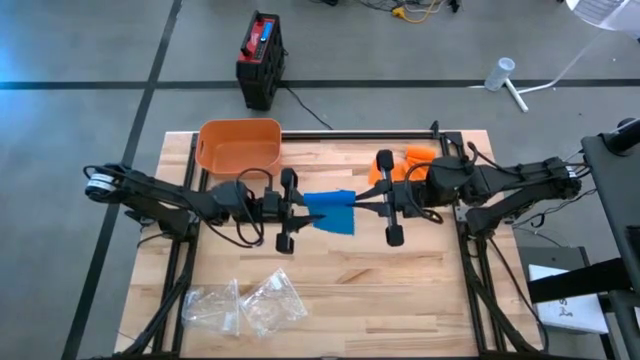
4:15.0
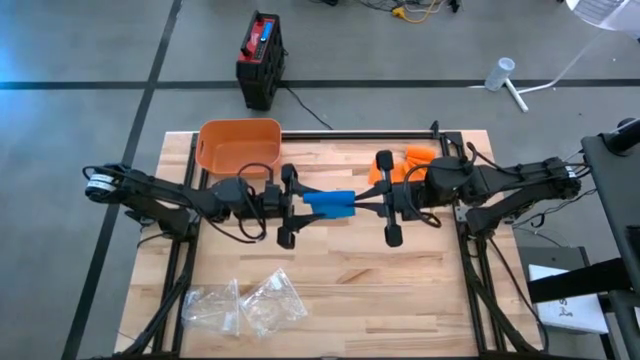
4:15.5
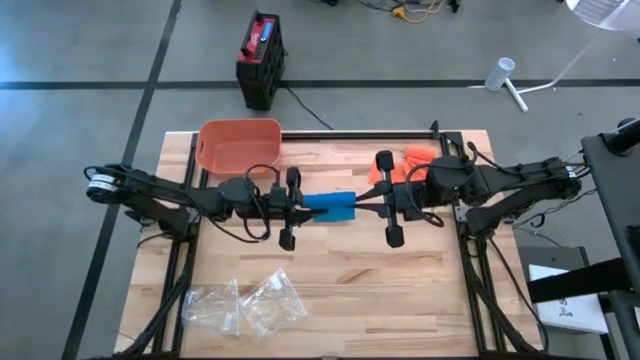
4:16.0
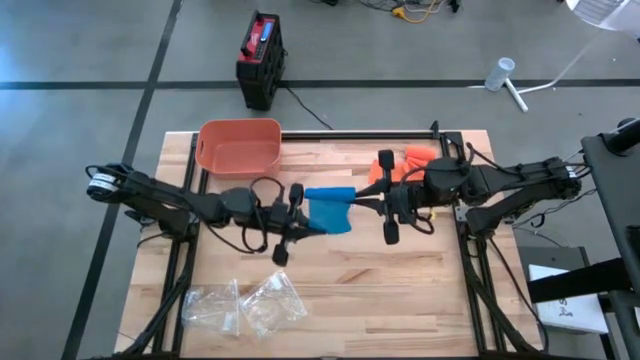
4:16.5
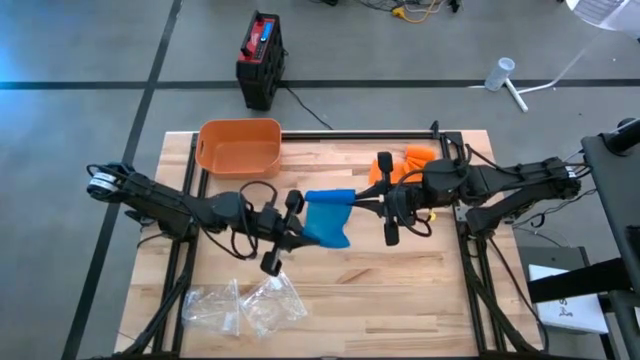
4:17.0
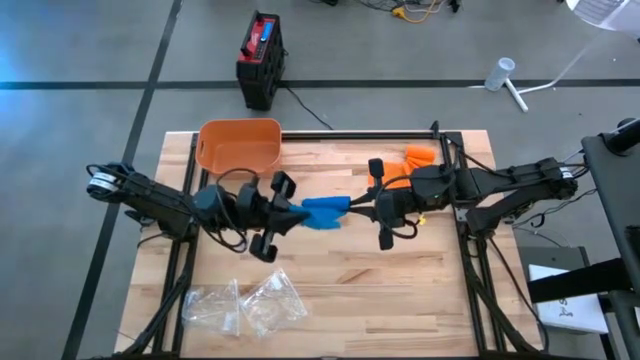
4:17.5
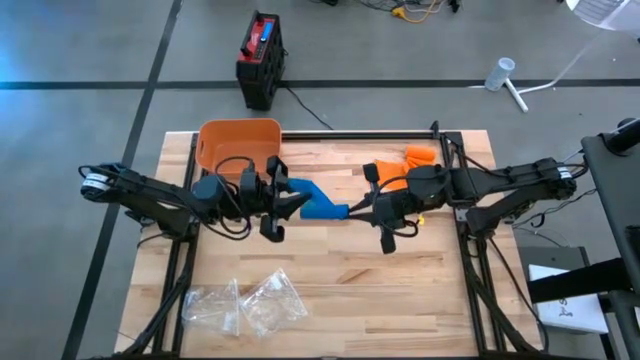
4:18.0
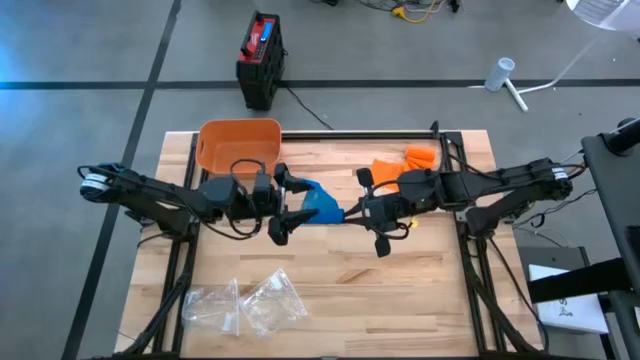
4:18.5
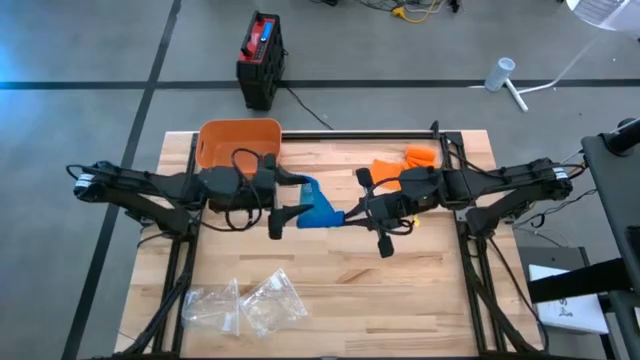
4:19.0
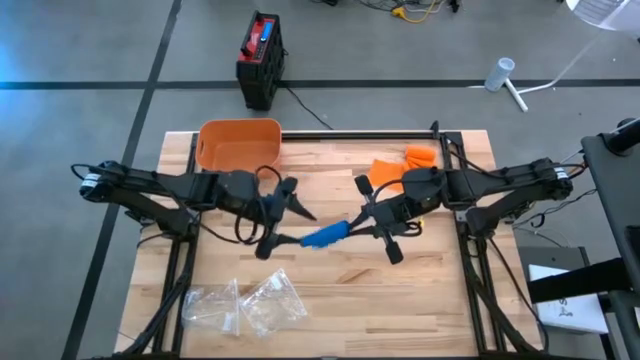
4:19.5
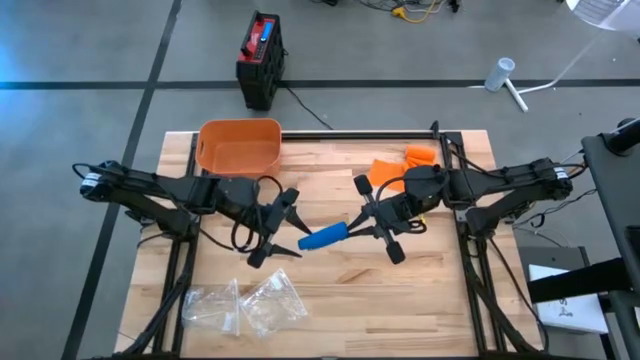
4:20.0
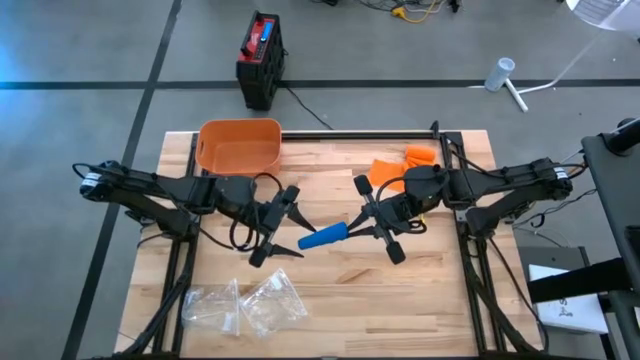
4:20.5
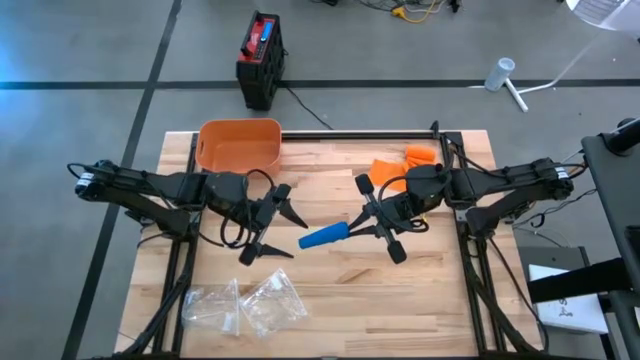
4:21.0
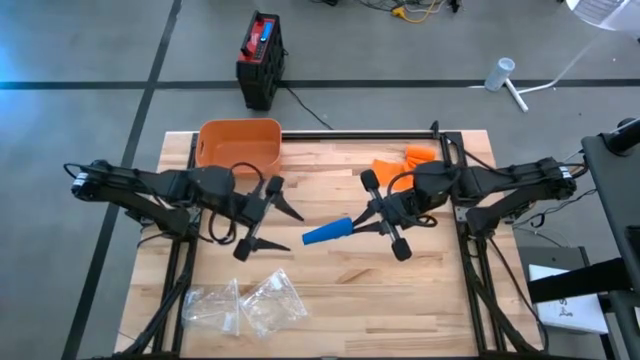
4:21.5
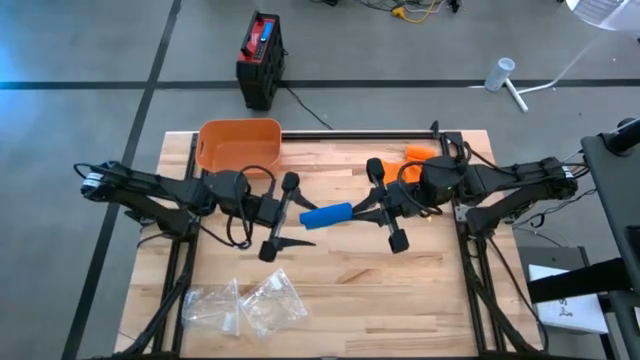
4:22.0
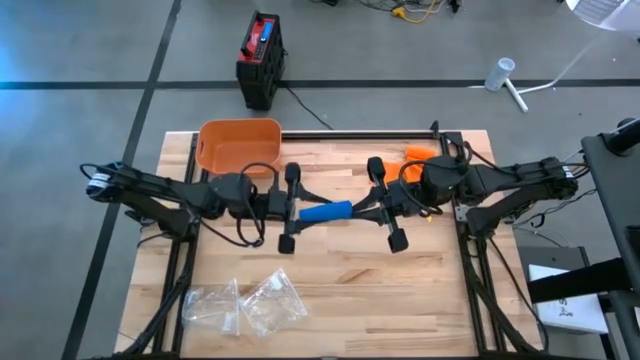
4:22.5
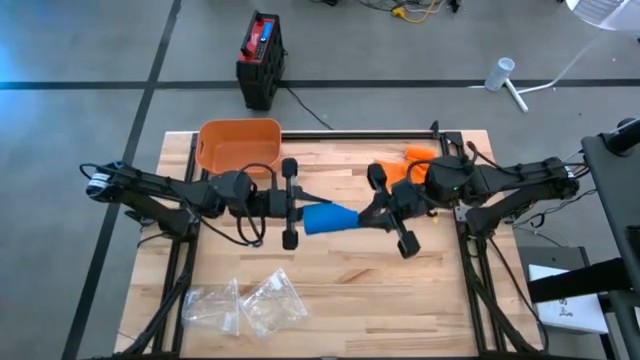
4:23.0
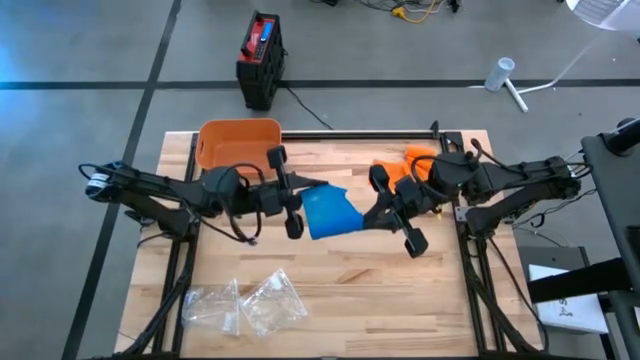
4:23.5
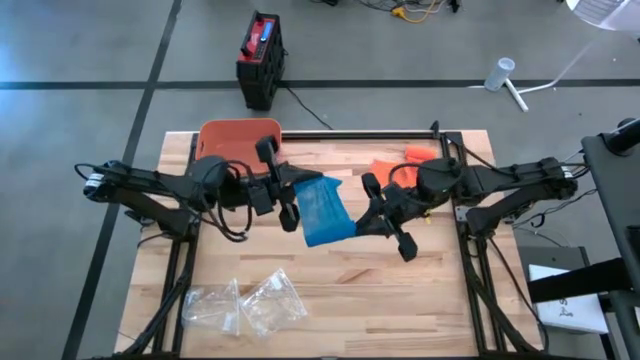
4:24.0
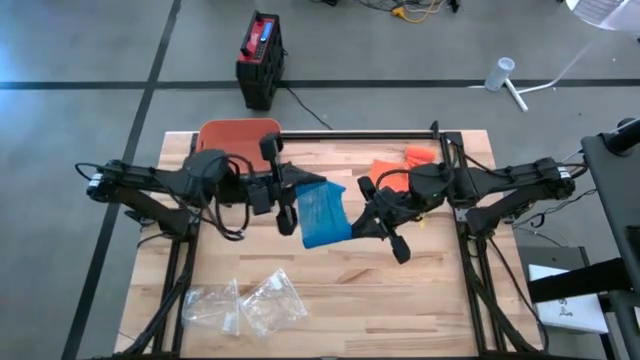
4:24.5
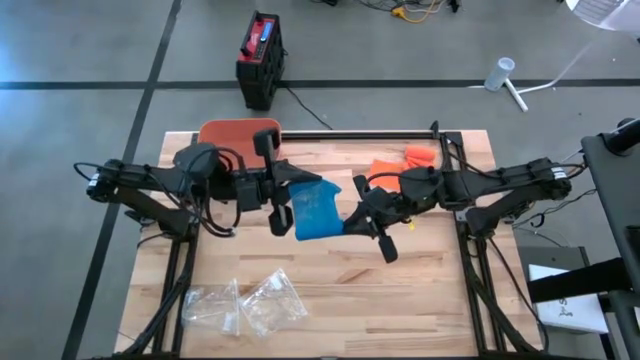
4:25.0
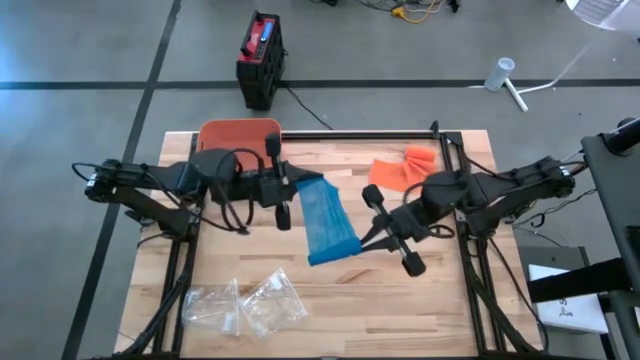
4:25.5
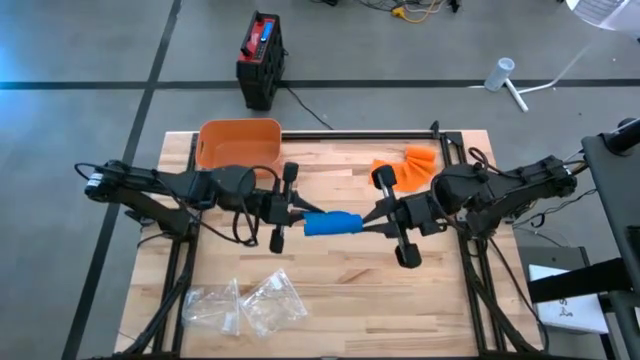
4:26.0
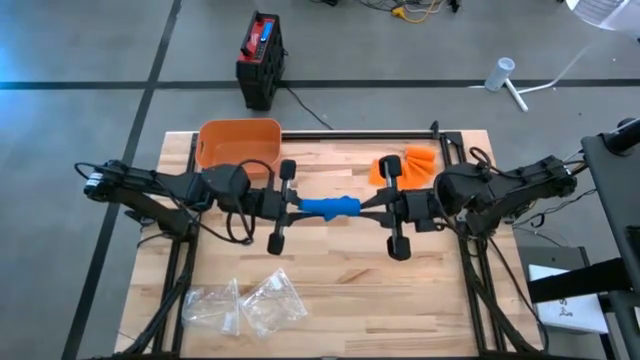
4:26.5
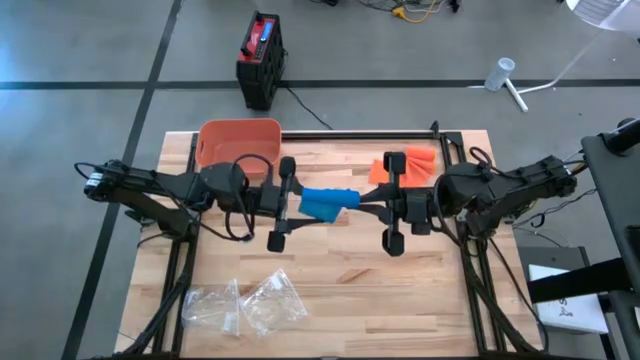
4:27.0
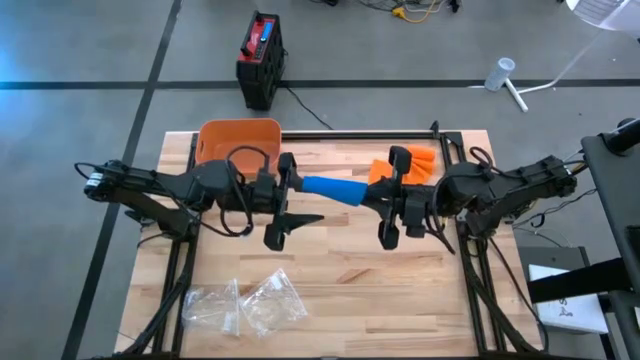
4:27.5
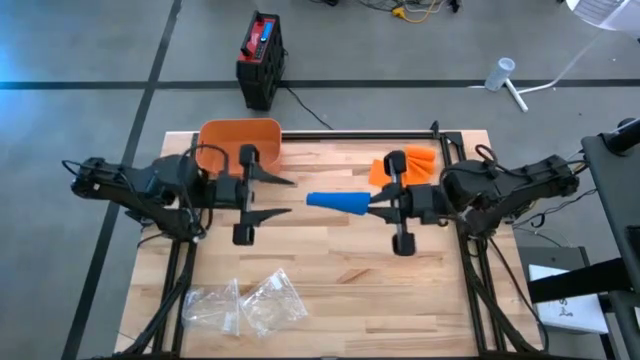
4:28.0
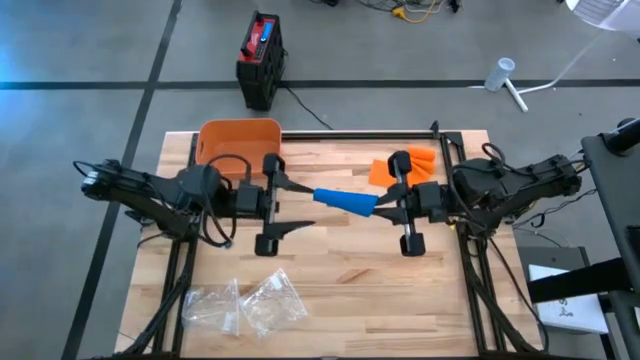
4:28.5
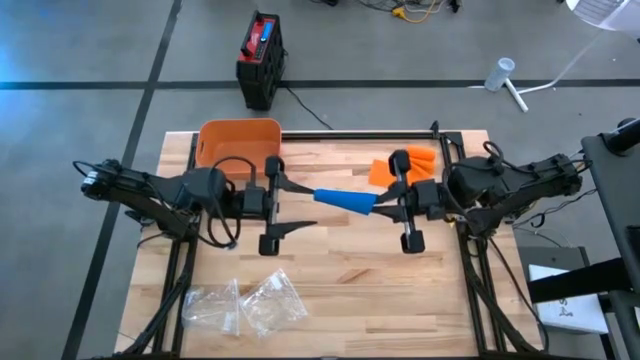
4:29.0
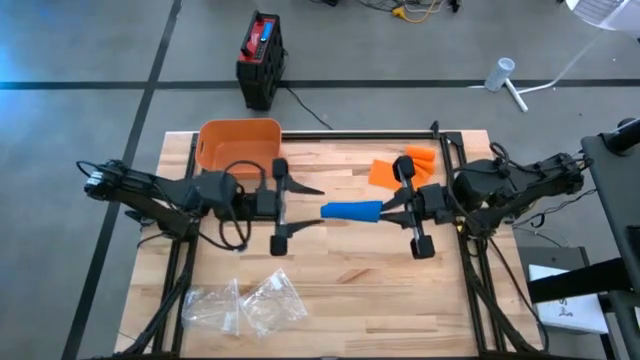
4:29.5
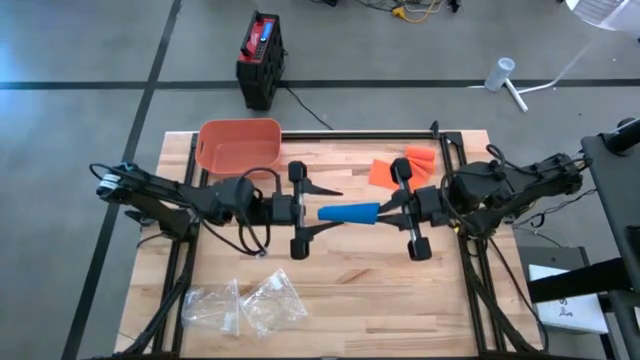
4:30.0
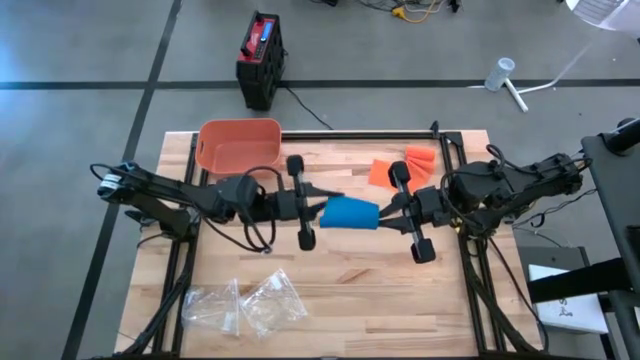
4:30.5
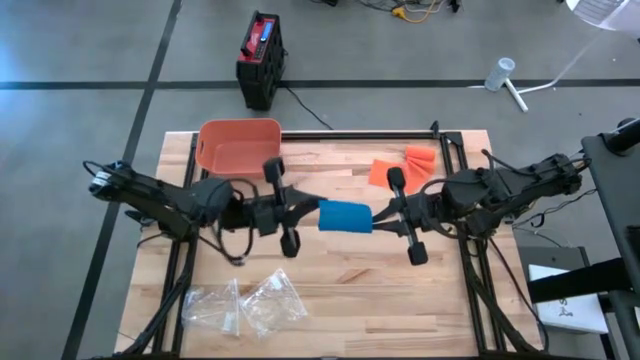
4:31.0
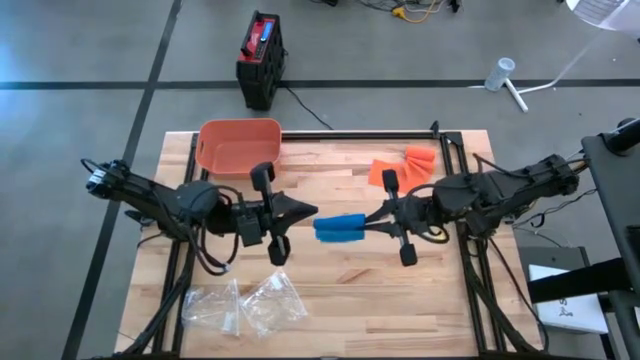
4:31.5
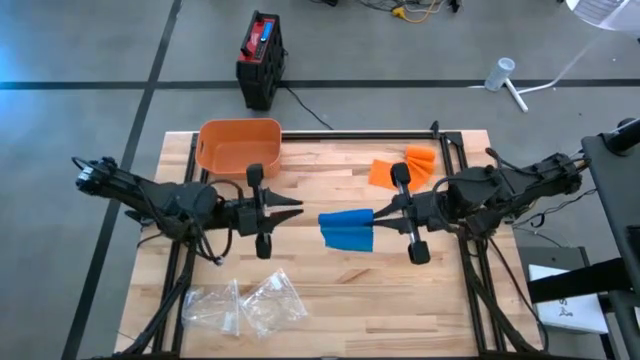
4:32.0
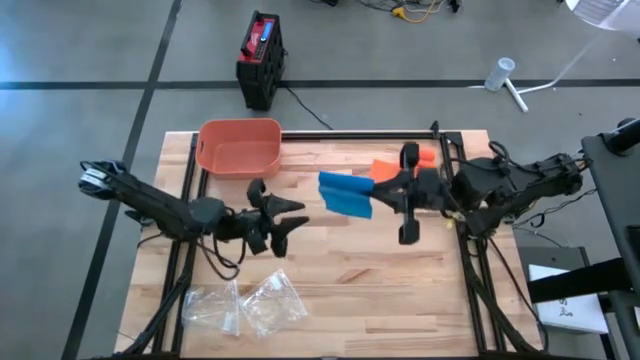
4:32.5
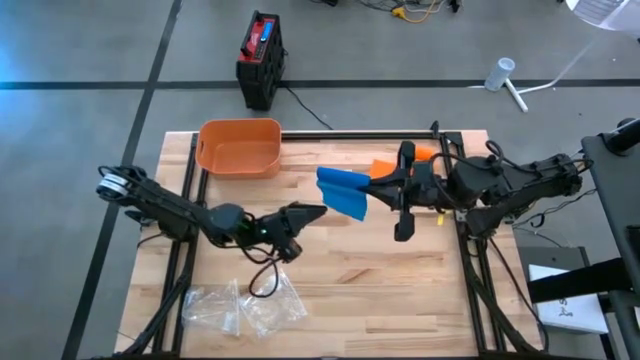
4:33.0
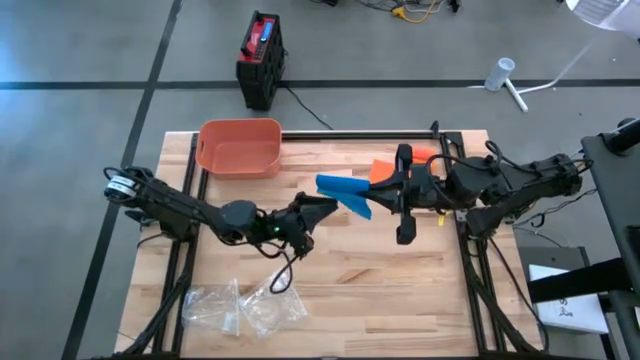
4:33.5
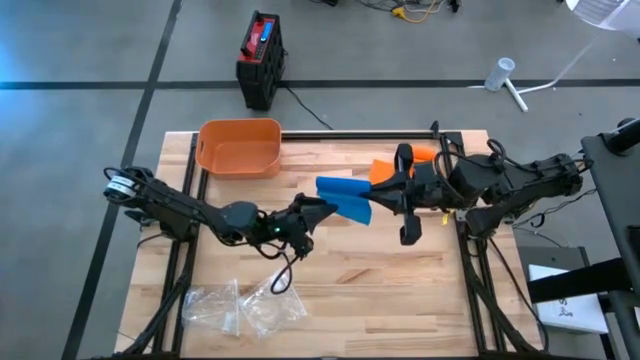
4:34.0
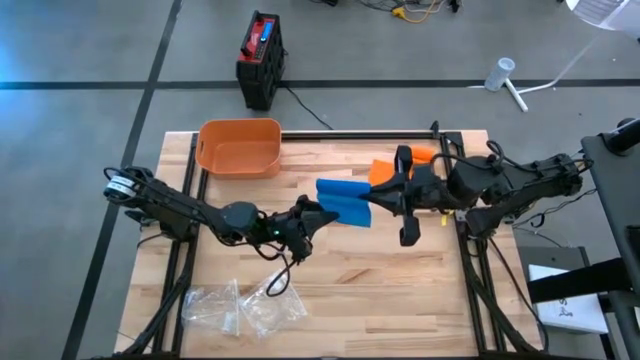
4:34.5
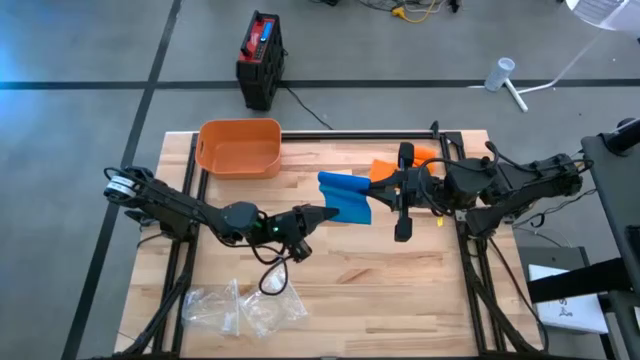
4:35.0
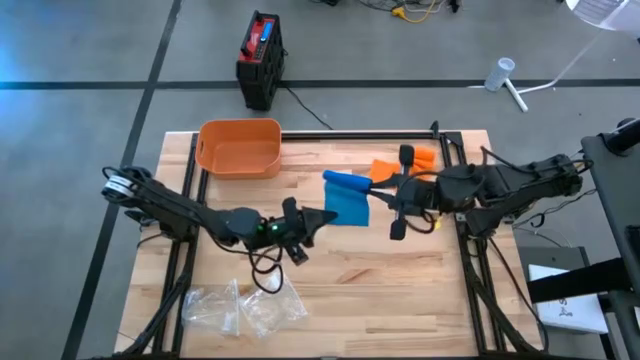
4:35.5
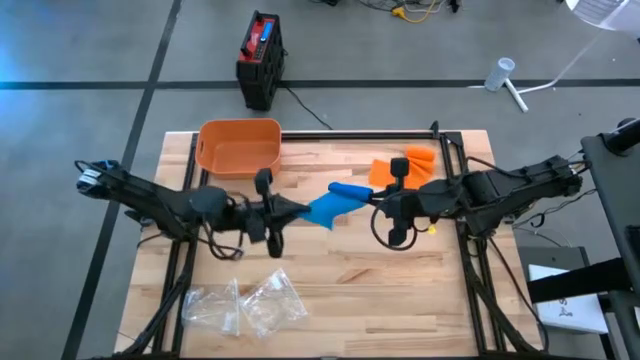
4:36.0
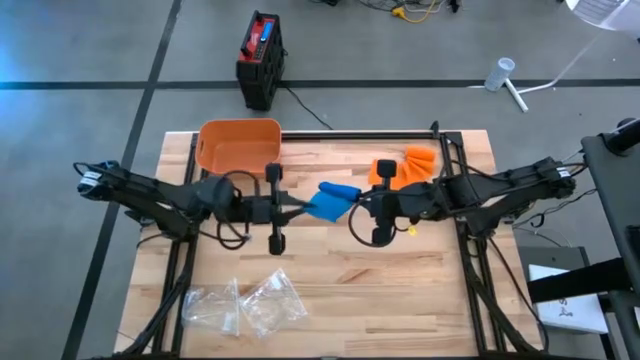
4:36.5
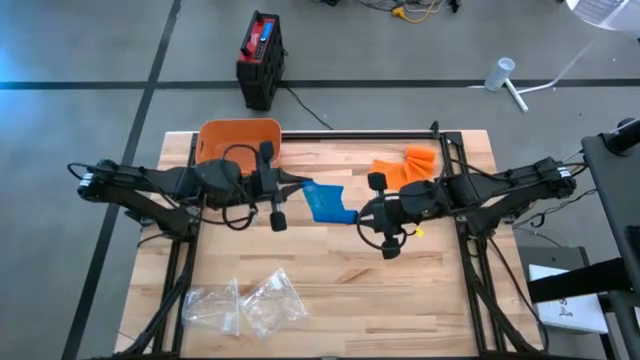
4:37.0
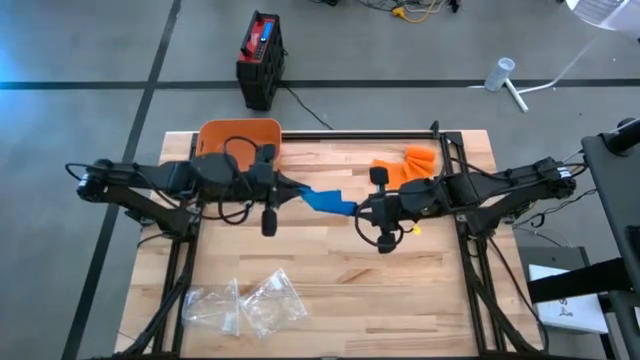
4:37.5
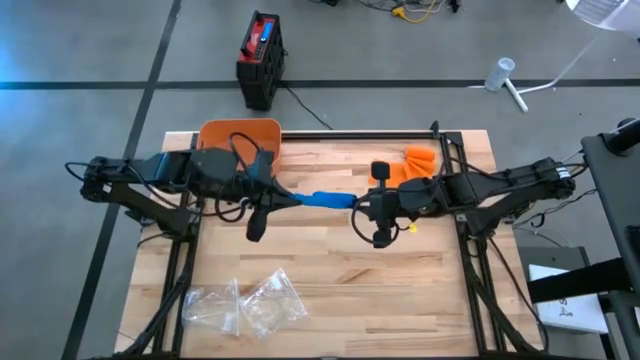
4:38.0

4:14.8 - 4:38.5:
Task: Roll bandage
Roll the blue bandage
